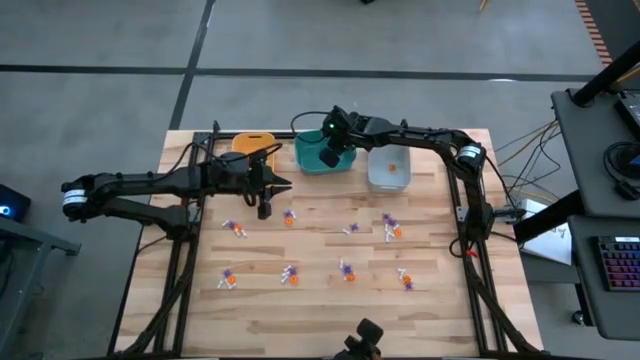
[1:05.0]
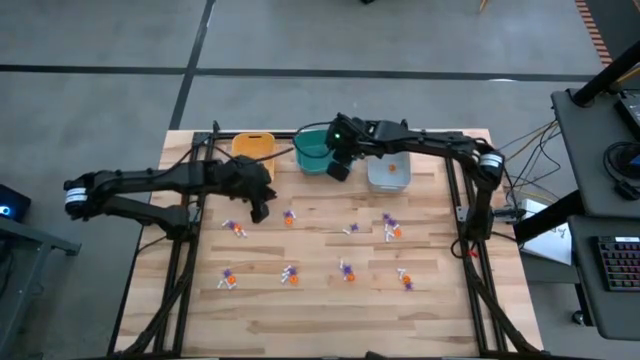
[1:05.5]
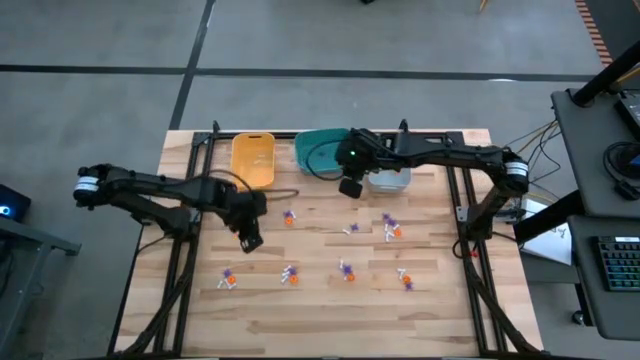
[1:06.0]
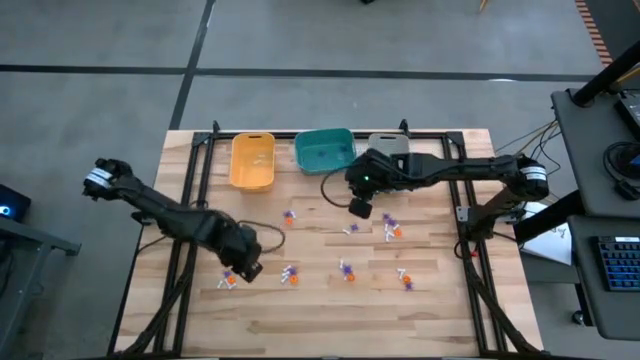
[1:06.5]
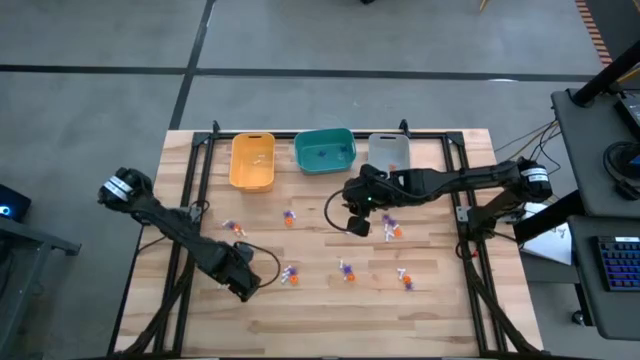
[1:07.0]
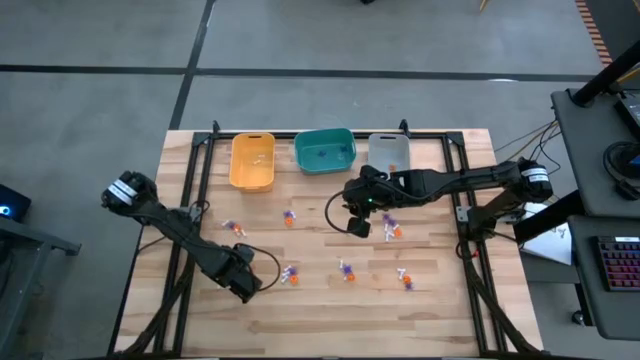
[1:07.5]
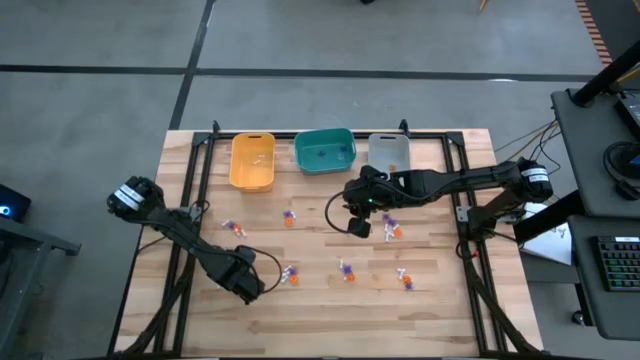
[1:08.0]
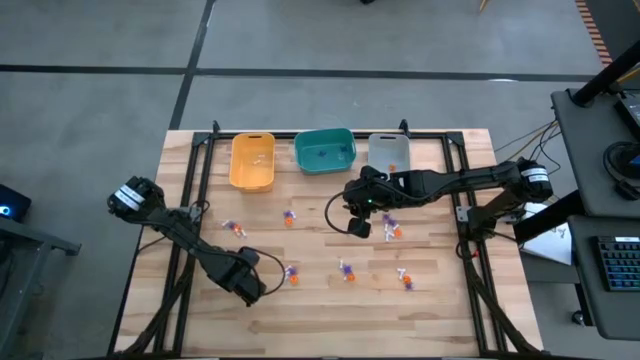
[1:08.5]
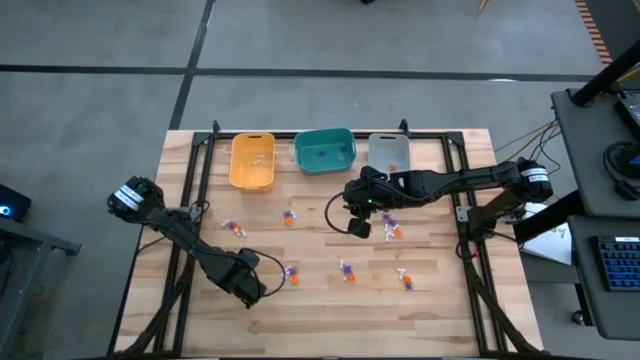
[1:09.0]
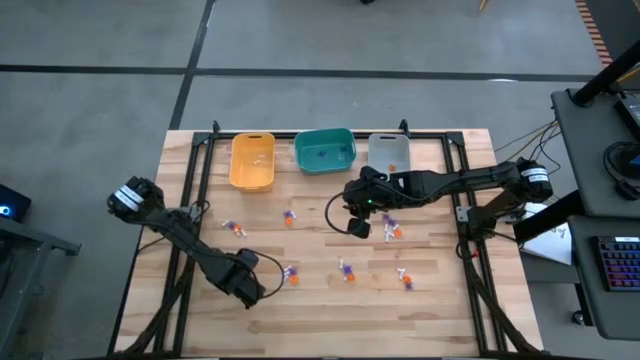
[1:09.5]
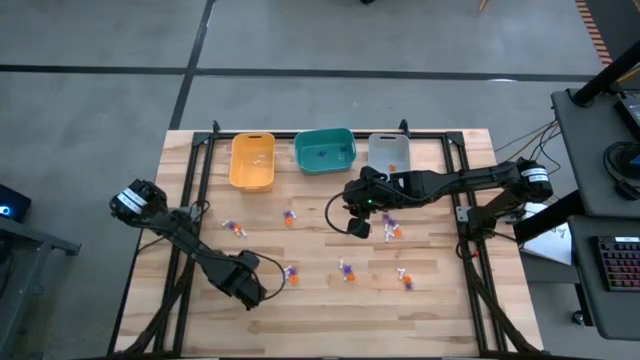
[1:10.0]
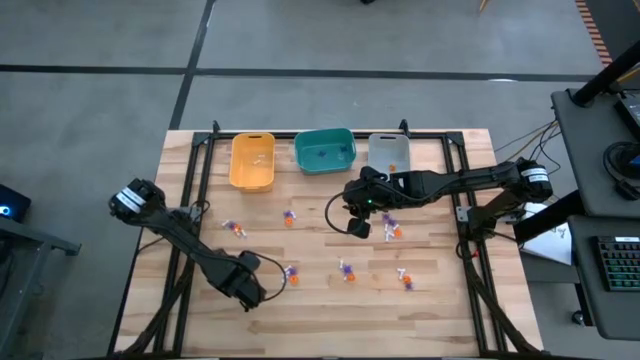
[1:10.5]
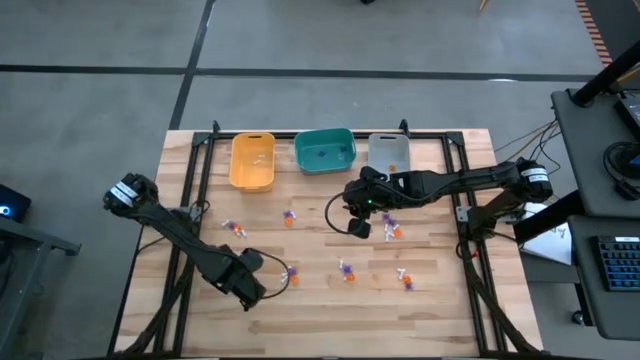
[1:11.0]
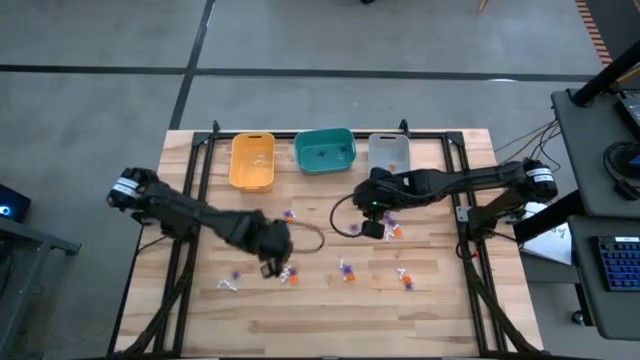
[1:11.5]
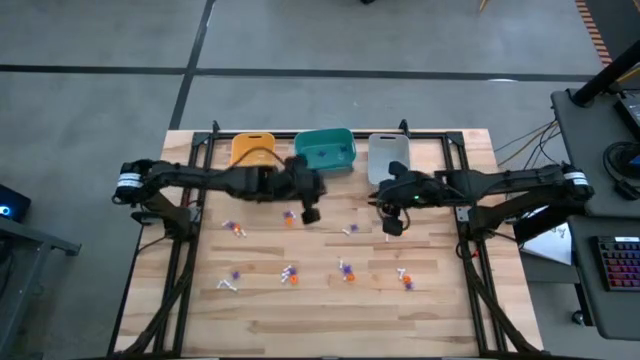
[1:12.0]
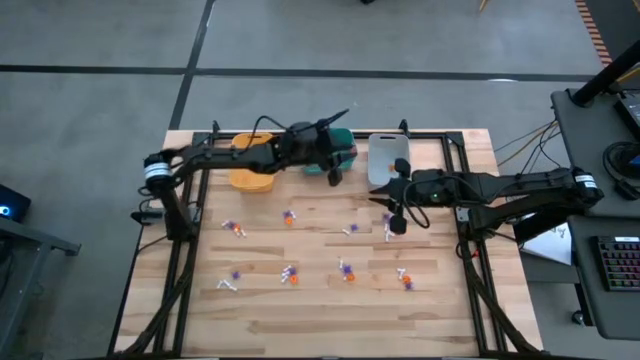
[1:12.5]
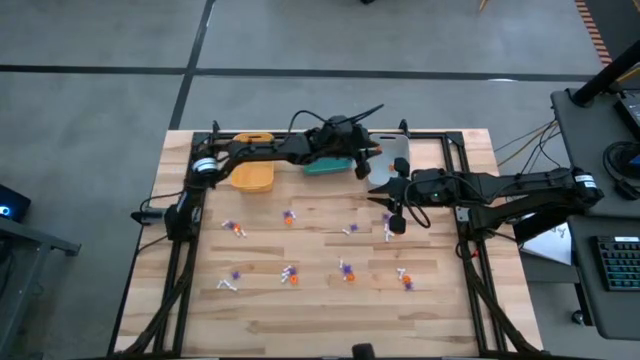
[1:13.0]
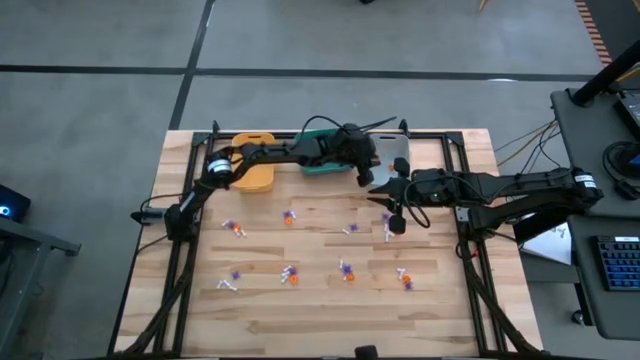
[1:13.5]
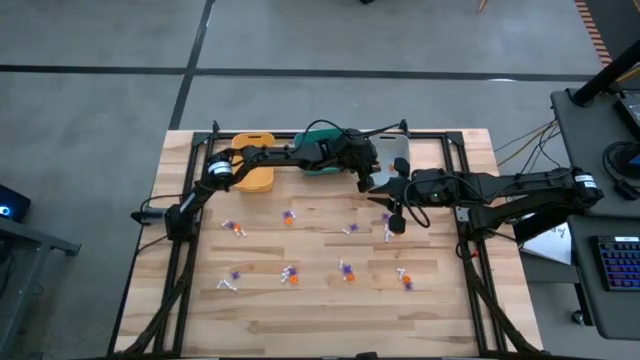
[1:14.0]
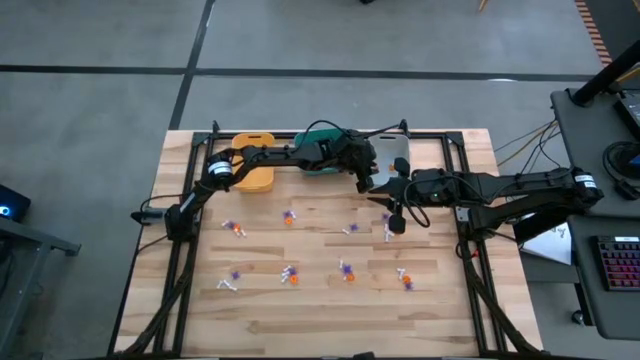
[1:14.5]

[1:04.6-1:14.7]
Task: Sort Halloween decoration
Put the orange pumpkin toy into the gray bin

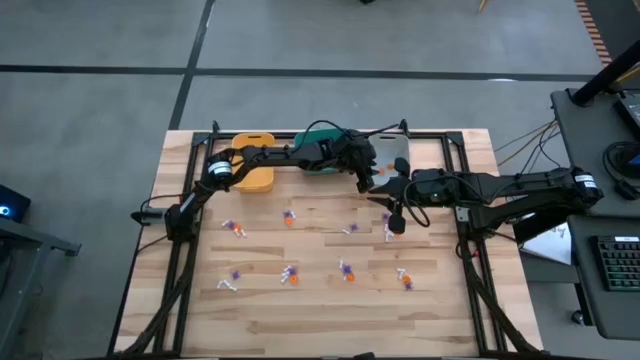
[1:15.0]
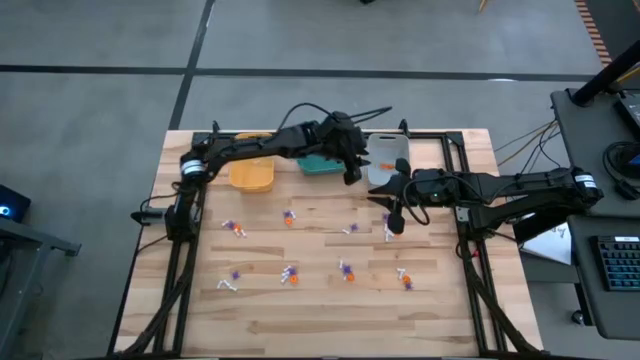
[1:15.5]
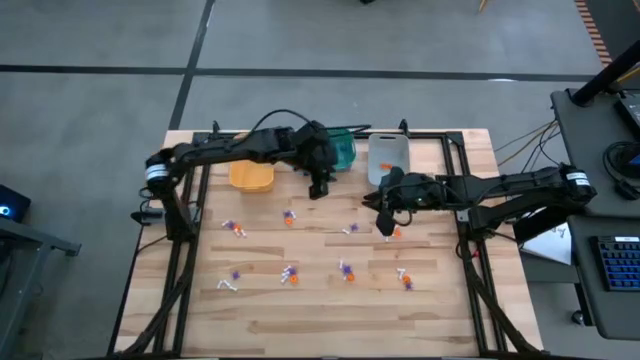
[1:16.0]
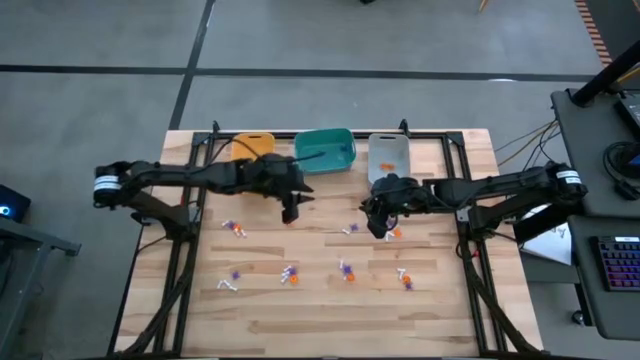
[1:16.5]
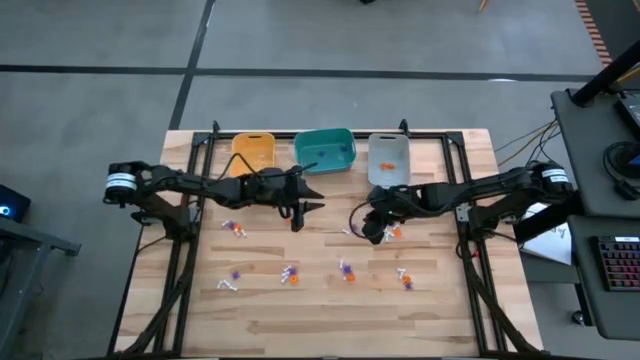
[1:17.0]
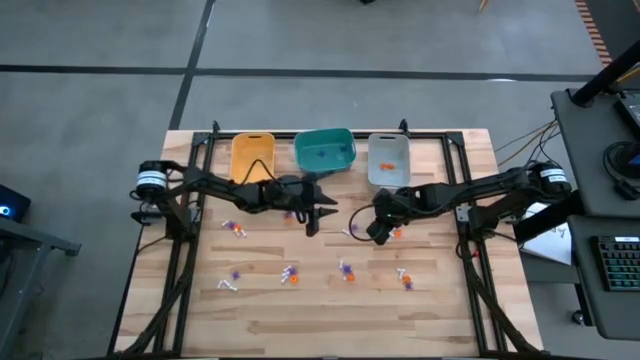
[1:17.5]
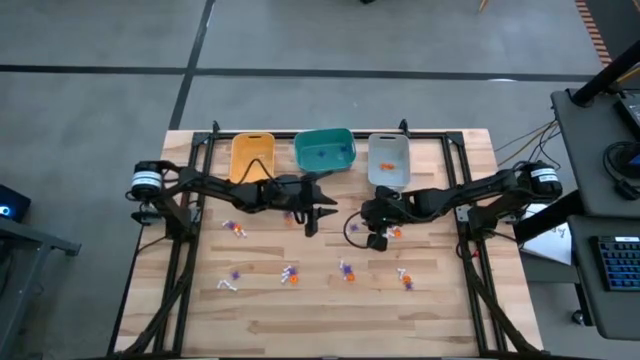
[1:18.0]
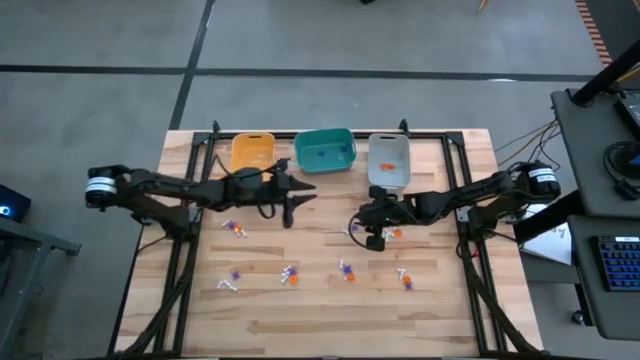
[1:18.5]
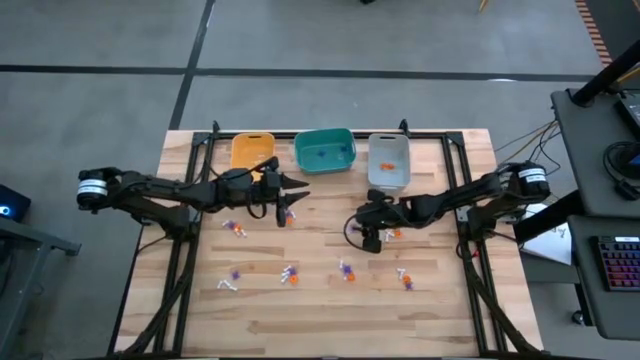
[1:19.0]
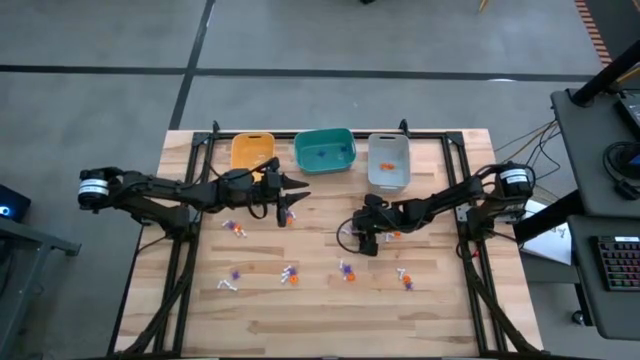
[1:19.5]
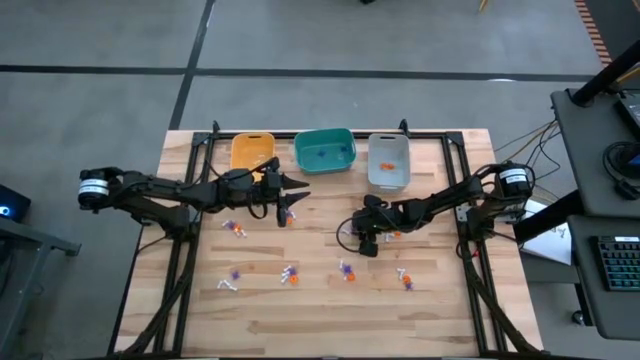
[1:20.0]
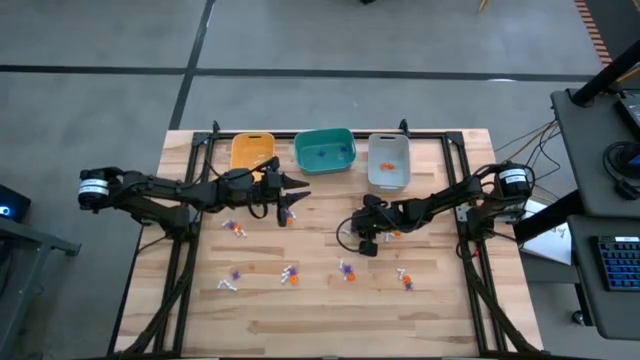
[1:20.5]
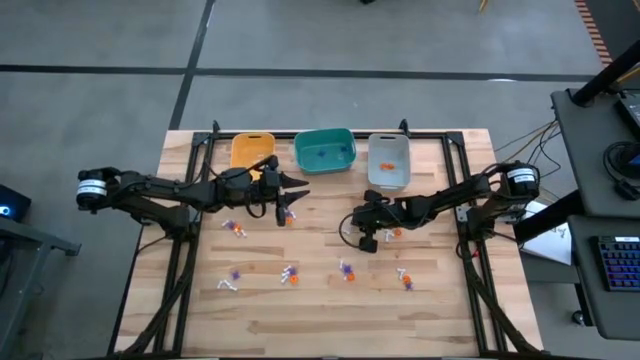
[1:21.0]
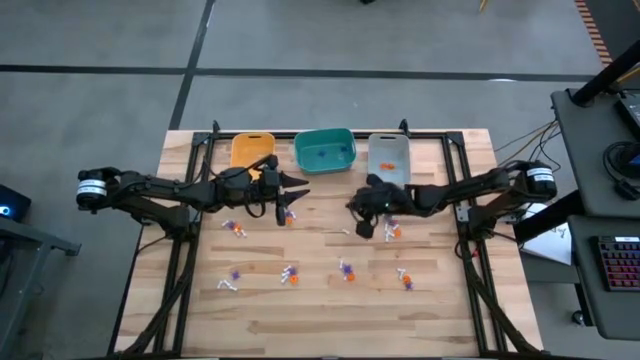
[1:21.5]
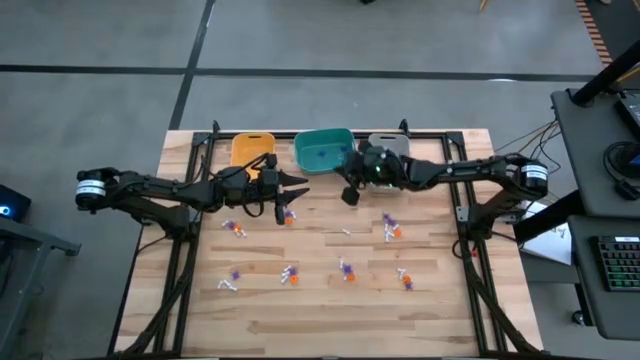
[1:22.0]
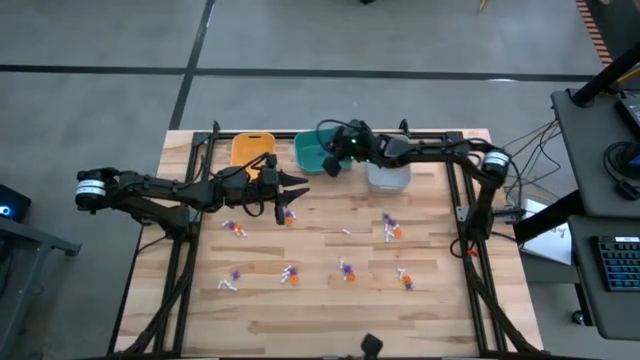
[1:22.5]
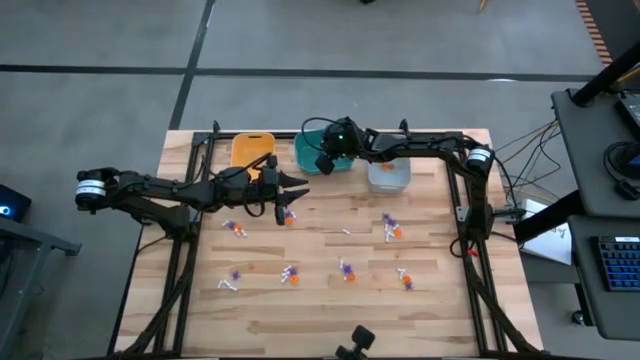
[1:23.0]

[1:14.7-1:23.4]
Put the violet spider toy into the blue green bin

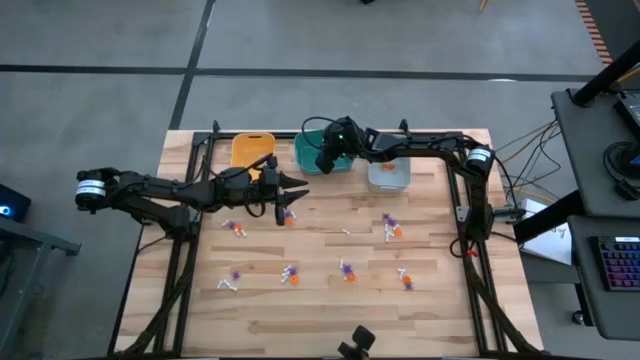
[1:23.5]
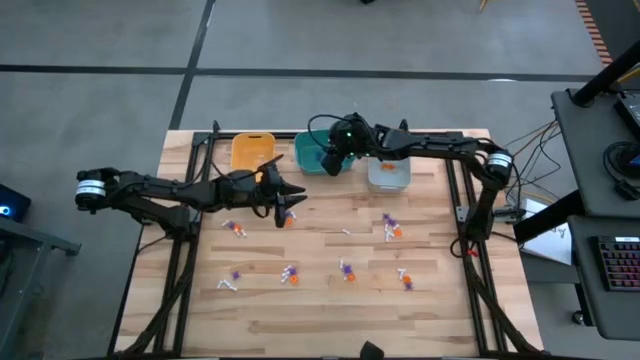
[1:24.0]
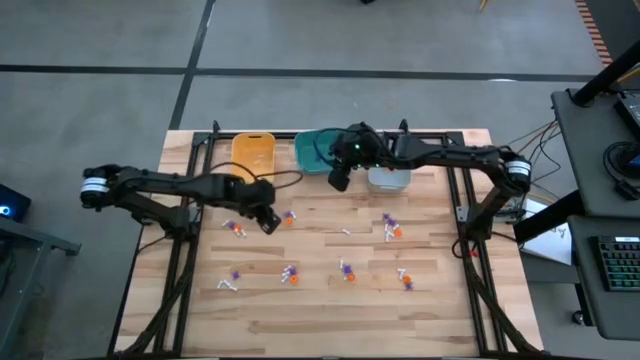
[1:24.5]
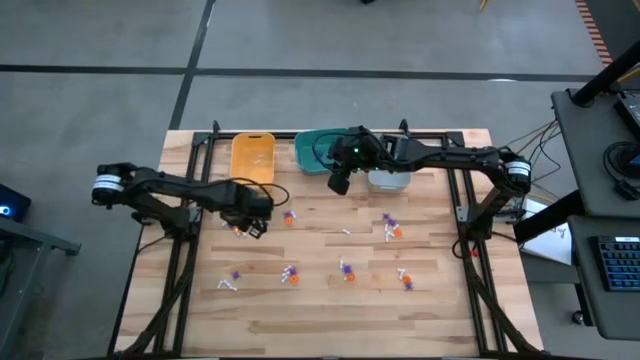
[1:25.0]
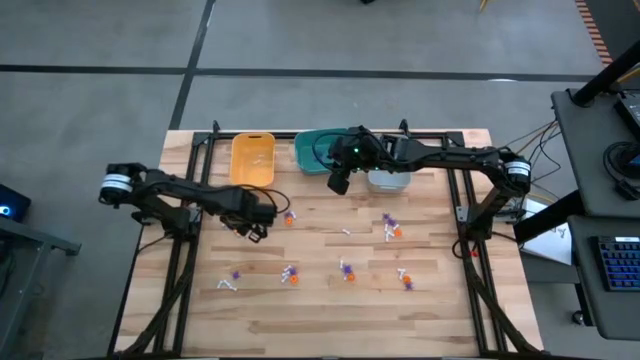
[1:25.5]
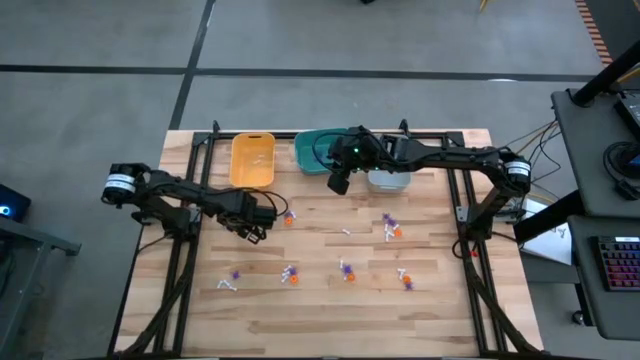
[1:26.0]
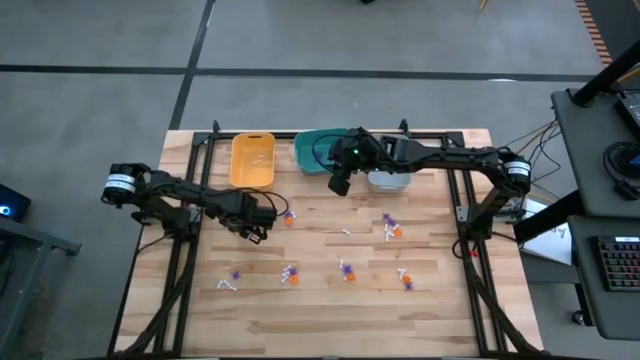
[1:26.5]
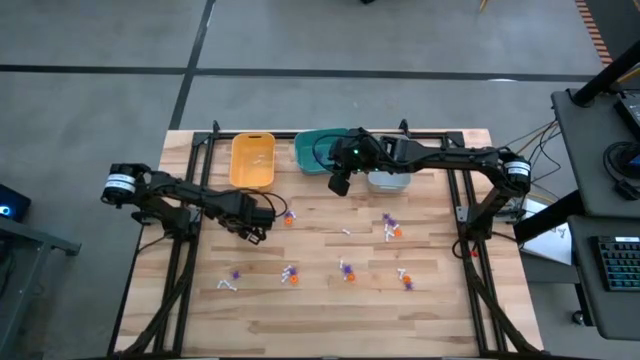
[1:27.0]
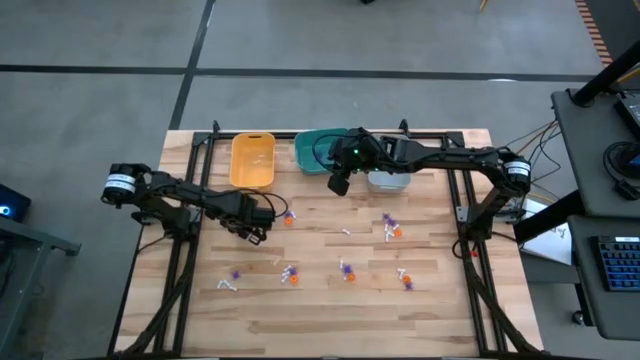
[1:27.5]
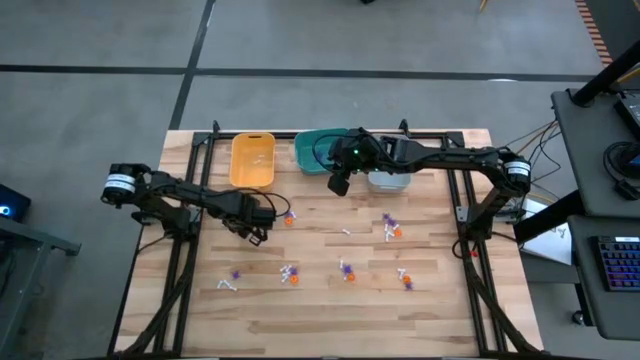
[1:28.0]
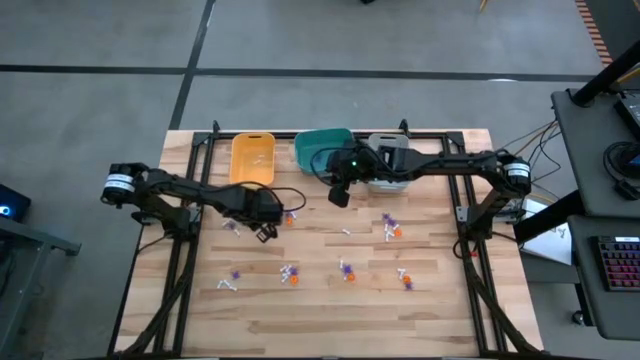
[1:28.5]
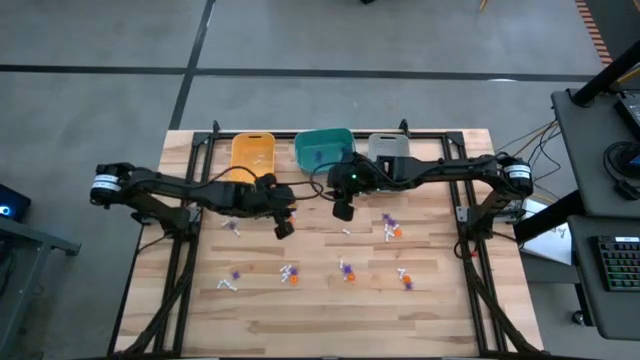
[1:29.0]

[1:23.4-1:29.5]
Put the orange pumpkin toy into the gray bin
